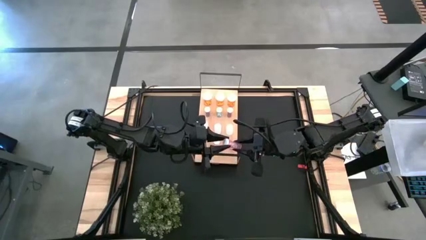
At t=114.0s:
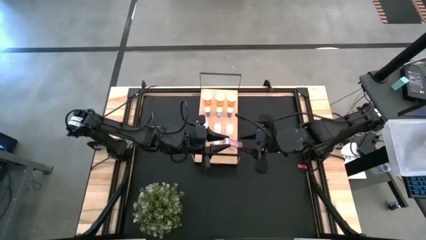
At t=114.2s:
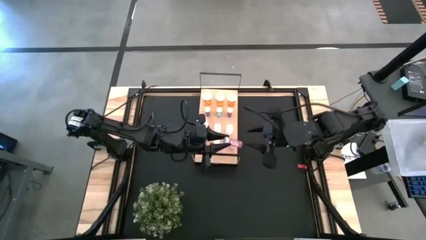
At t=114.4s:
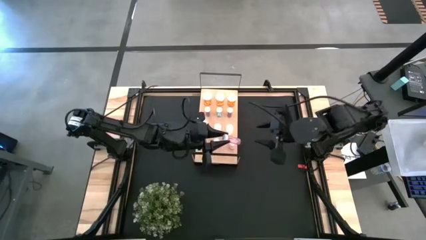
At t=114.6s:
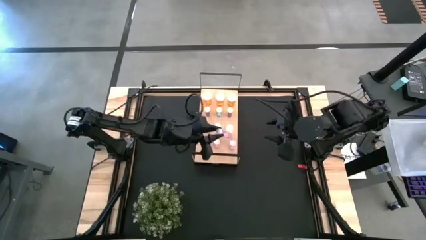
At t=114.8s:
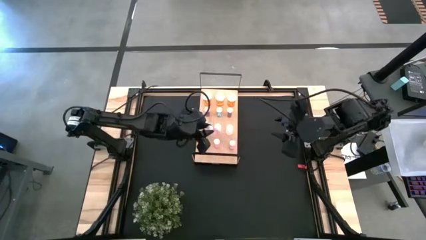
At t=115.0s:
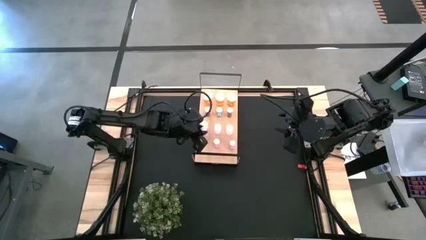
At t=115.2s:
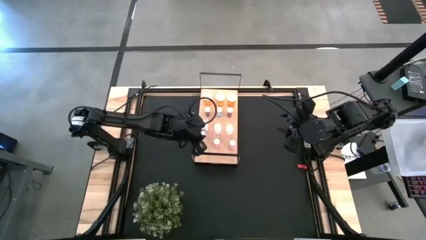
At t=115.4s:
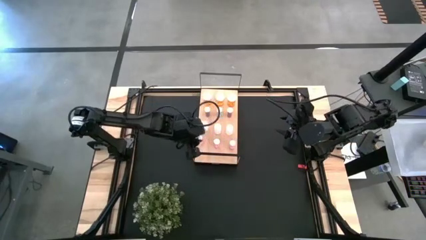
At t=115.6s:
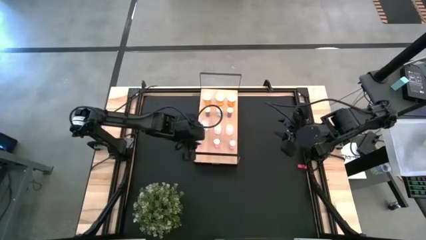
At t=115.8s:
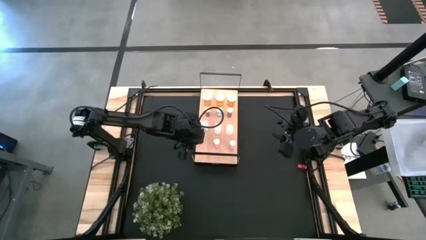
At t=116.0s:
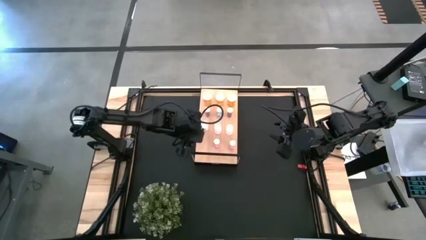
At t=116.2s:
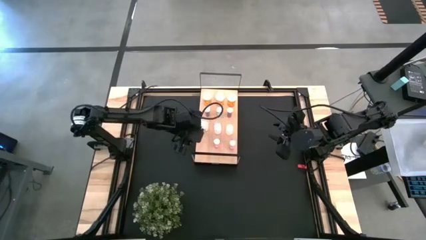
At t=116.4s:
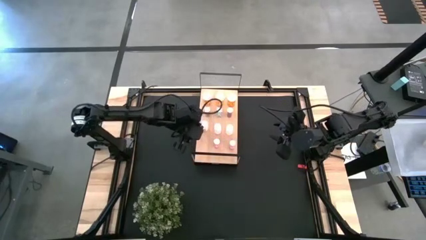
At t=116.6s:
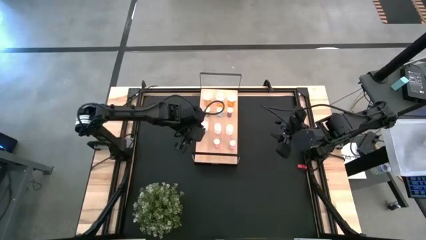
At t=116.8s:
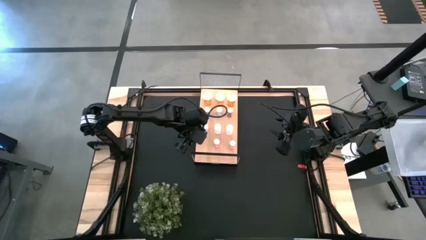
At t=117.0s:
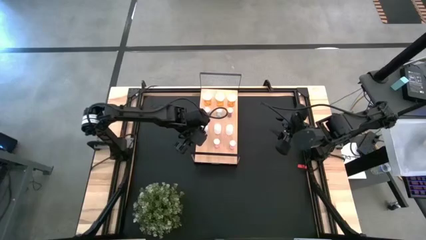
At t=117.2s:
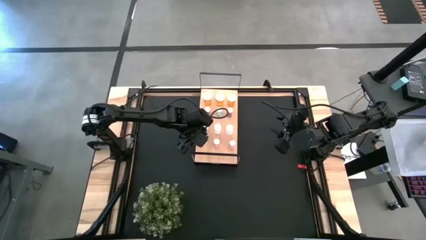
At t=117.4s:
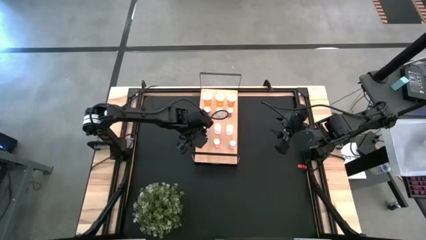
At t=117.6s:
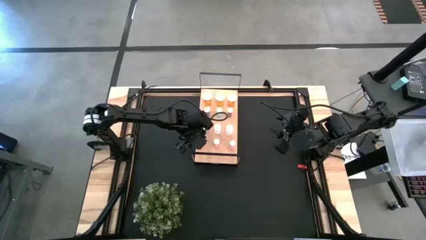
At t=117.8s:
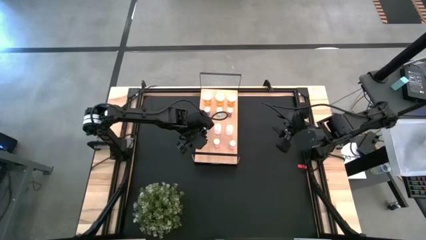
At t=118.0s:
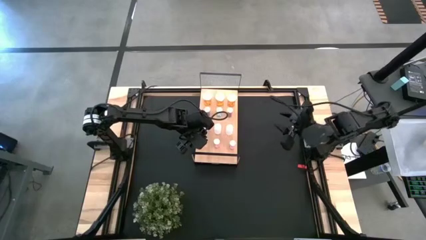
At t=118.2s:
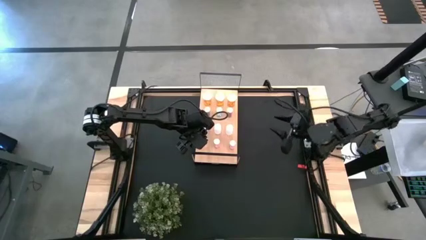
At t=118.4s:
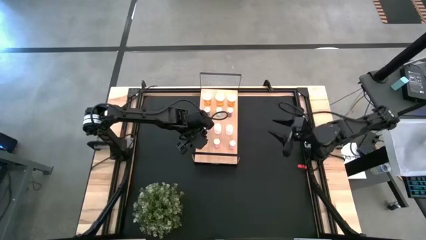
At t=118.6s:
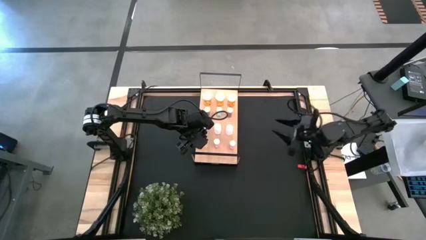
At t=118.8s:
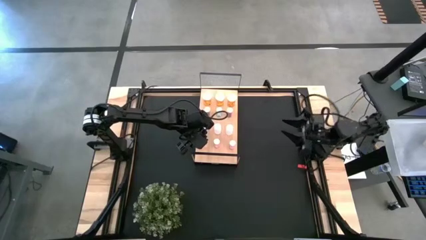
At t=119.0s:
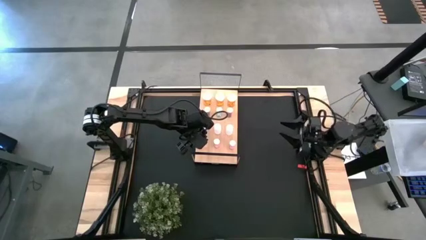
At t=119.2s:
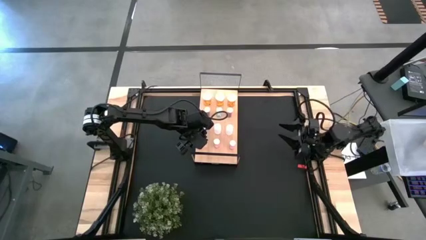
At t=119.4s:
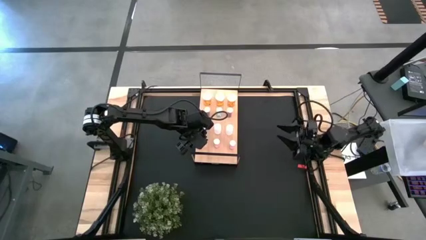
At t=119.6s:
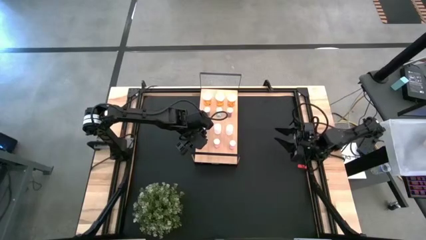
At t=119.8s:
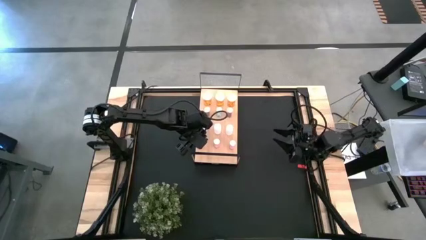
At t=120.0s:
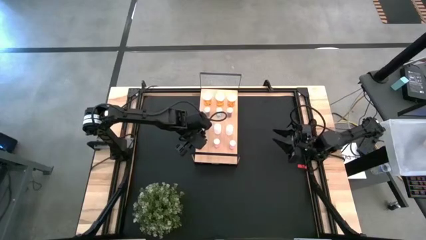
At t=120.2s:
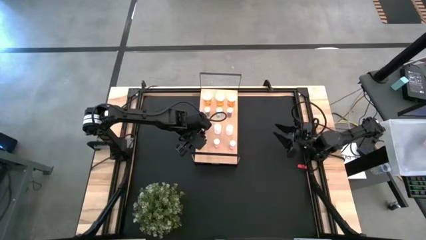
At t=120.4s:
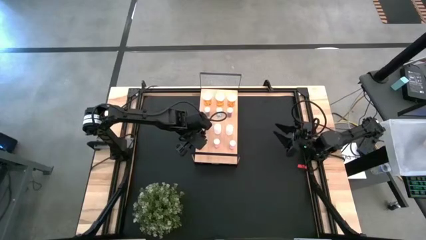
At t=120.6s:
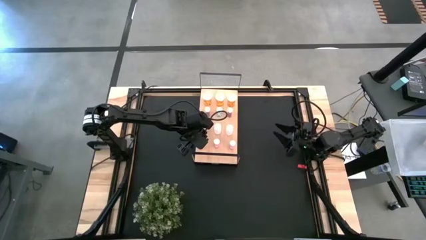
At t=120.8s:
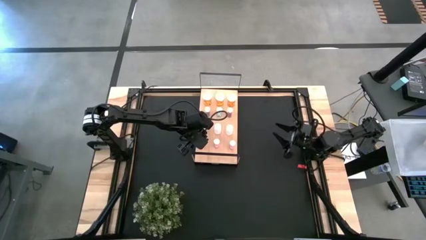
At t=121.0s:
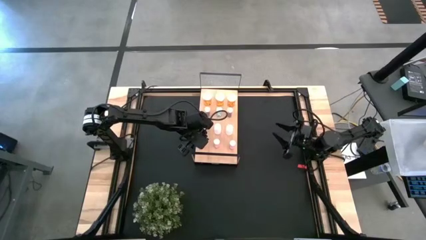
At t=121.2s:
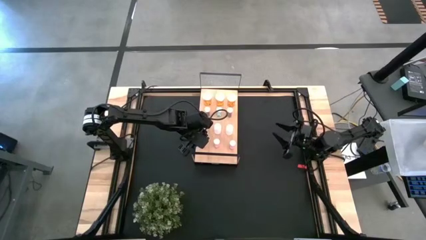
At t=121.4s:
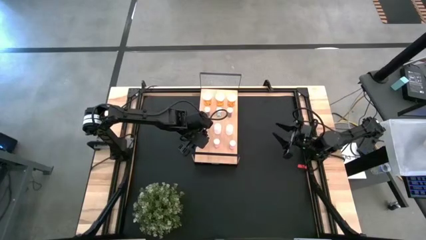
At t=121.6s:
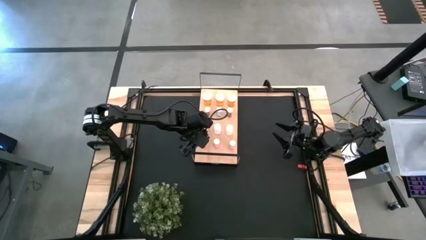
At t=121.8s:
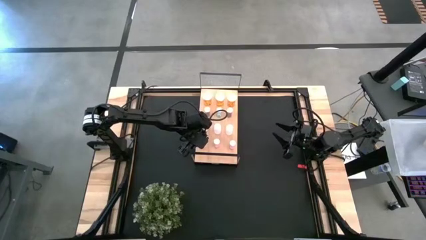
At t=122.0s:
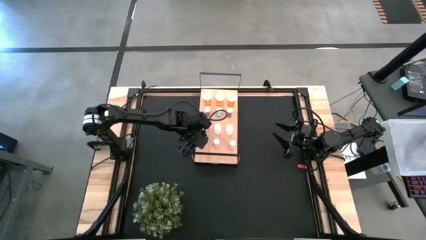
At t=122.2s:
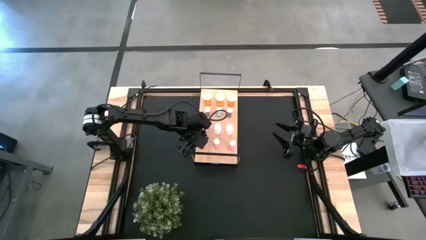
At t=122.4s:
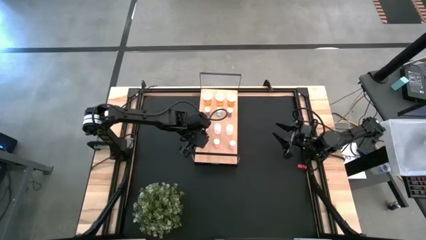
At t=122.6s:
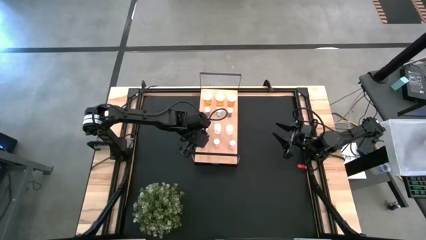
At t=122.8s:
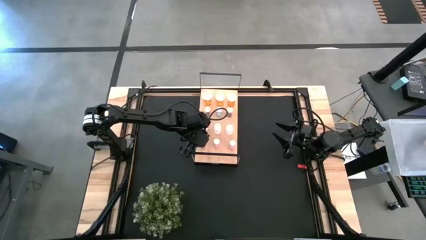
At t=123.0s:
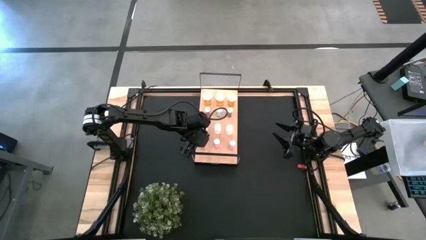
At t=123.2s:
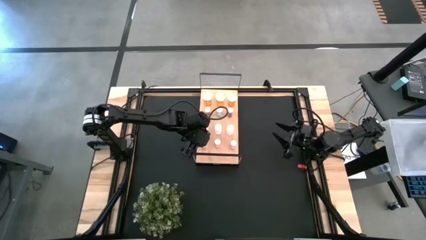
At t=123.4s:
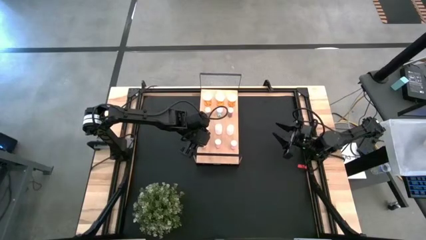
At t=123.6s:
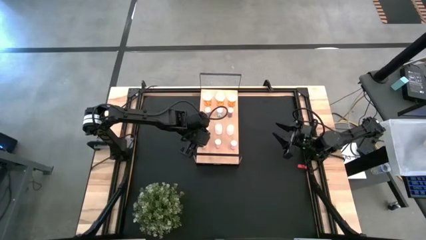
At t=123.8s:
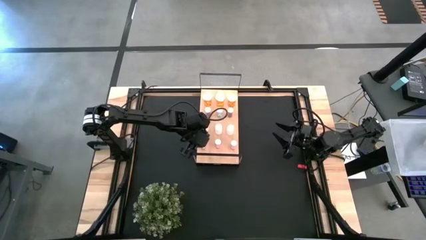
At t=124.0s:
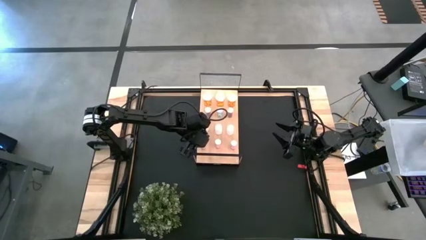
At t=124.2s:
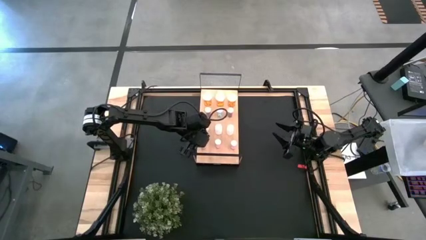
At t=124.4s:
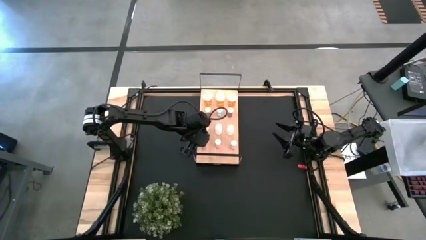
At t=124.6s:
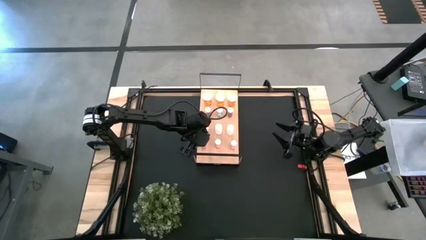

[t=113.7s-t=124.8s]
Task: Pick and place medicine bottles onto shelf by color
Put the pink pill bottle aligned with the other pink pill bottles on the shelf

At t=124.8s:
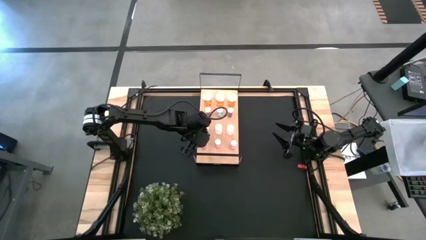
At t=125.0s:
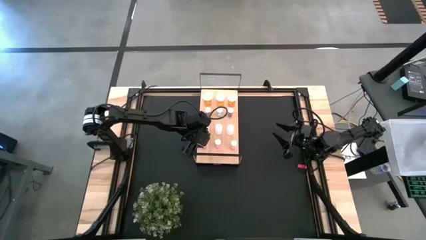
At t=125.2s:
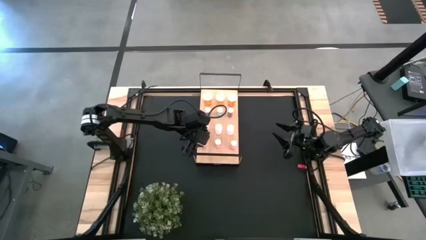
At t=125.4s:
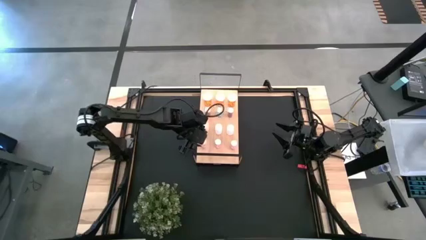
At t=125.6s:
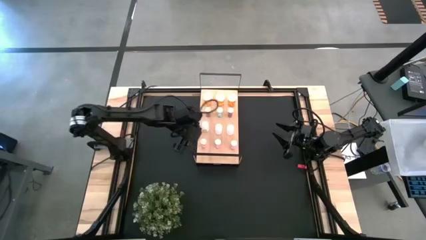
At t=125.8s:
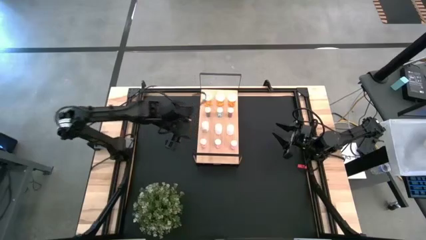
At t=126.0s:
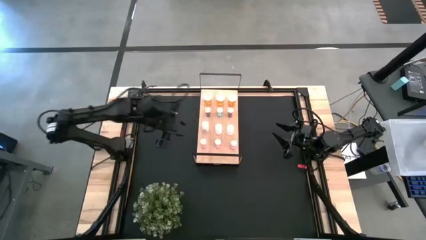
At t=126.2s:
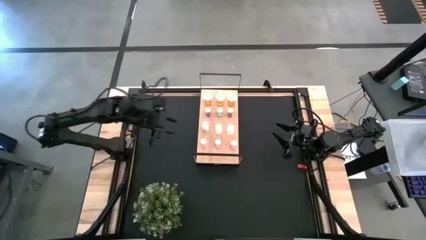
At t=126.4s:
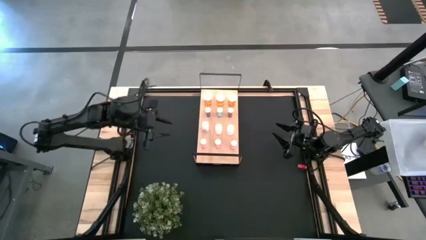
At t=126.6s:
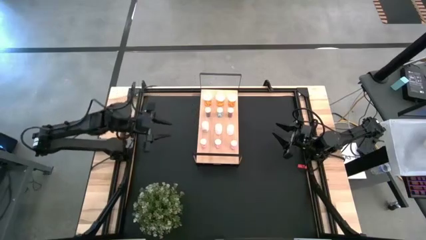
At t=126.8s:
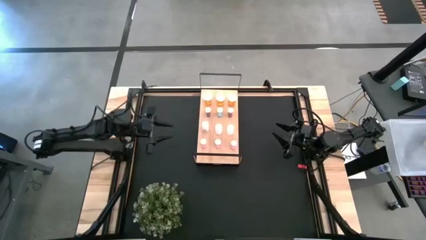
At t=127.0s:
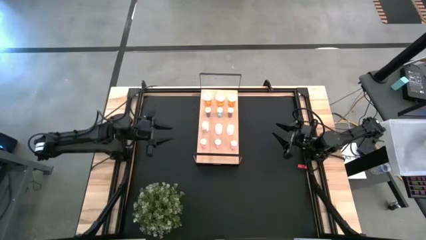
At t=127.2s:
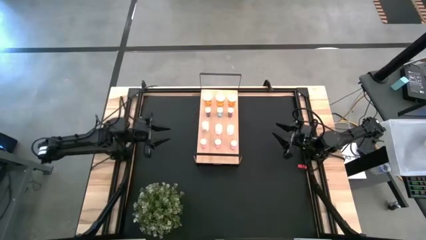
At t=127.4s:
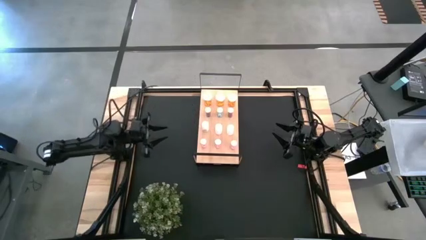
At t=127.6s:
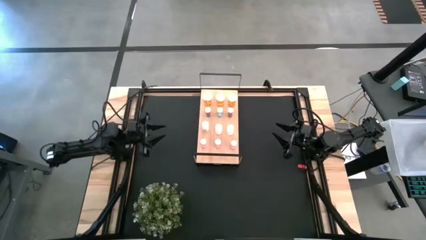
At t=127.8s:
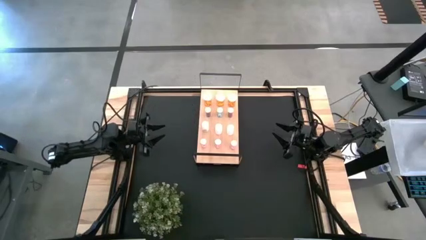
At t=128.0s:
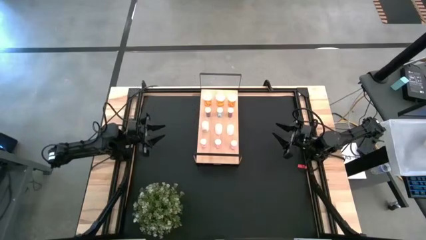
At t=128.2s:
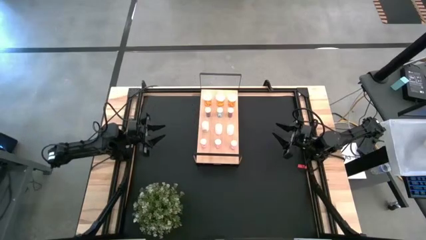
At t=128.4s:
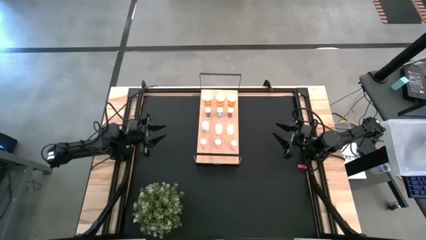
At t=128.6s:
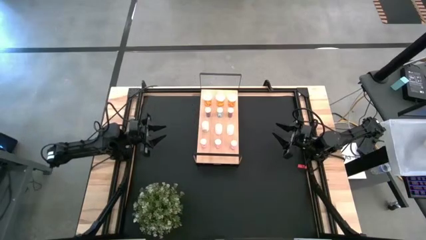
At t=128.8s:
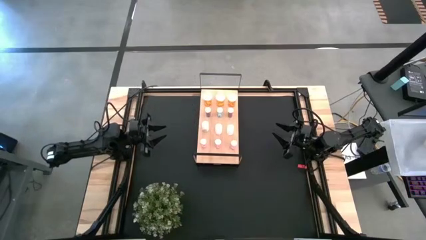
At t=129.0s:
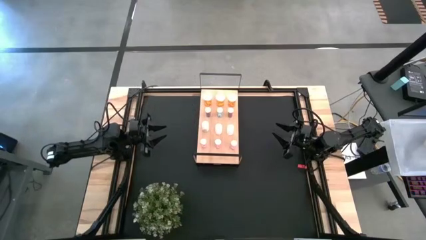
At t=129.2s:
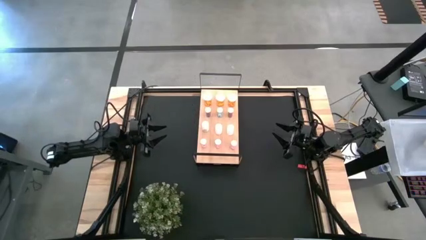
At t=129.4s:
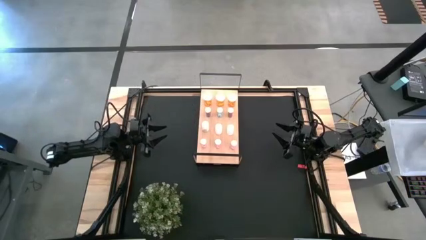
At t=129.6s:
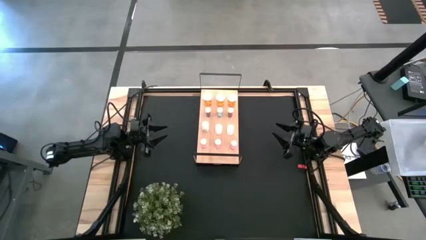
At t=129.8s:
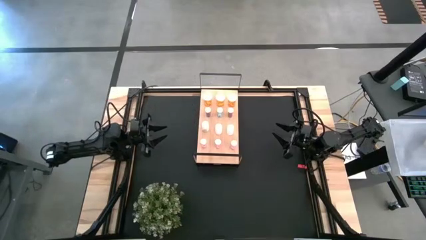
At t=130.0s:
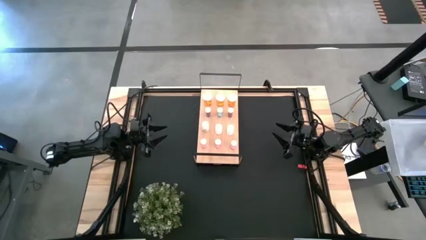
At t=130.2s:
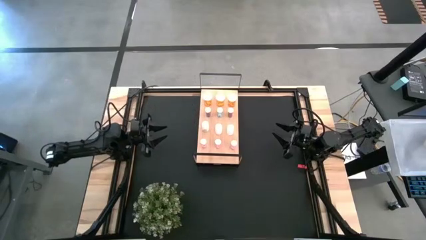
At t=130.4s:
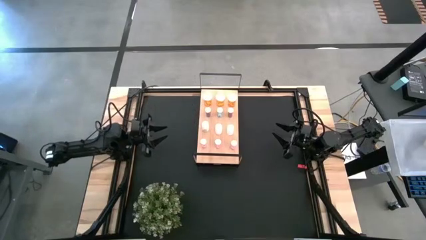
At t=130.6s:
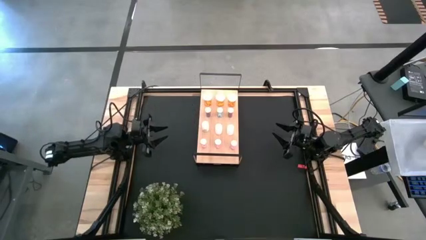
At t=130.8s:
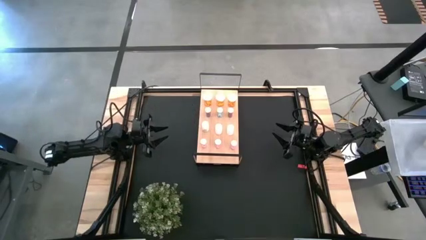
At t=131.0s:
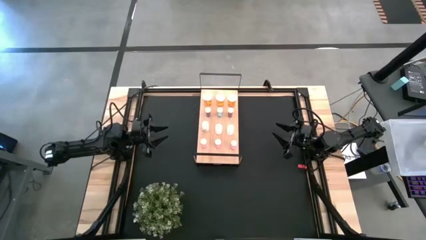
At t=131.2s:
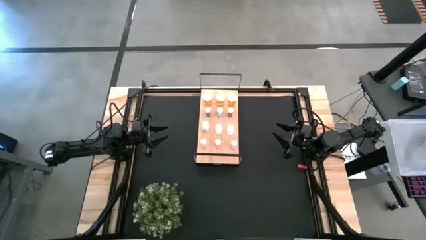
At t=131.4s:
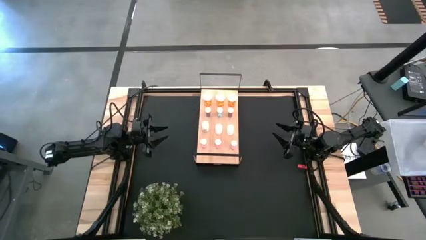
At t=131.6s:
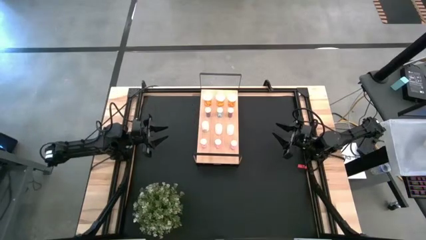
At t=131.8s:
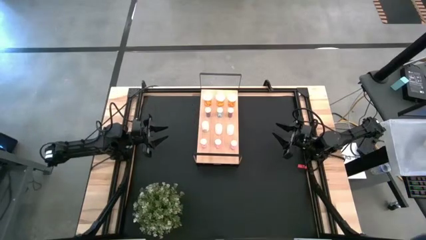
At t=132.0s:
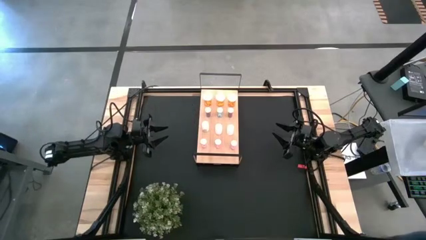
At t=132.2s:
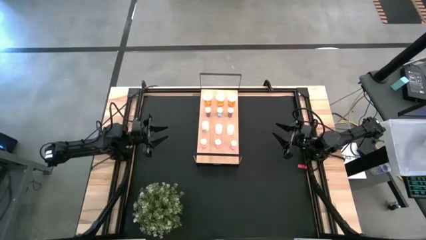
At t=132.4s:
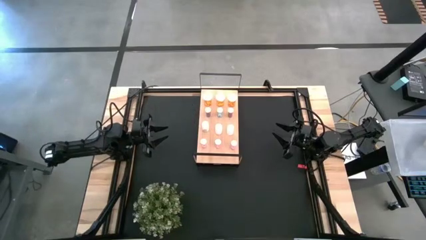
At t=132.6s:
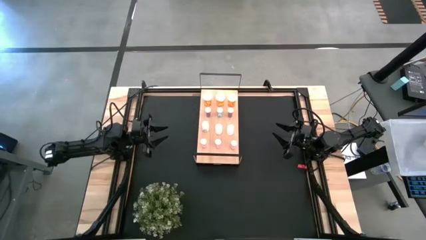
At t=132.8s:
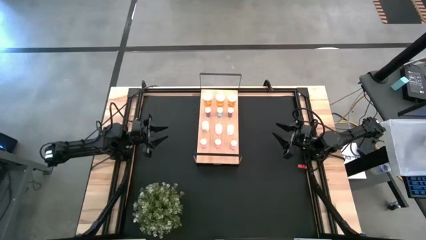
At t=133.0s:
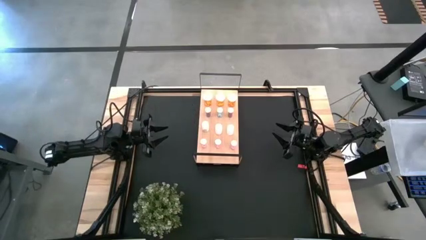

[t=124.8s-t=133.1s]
Return to Home Position
